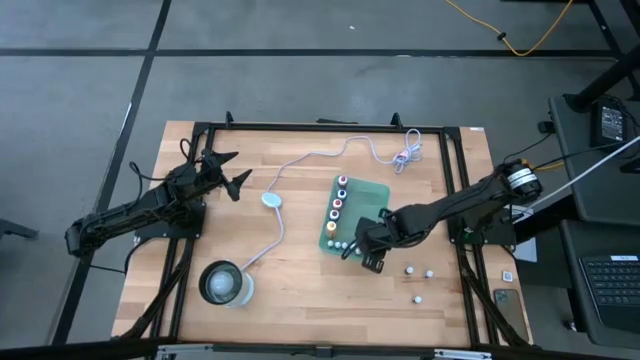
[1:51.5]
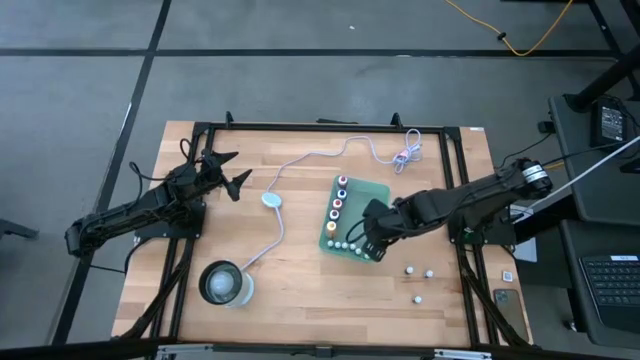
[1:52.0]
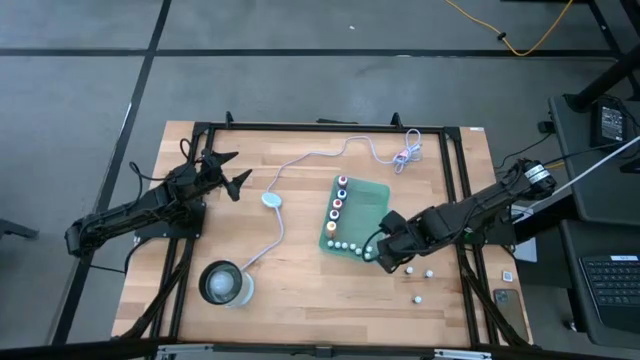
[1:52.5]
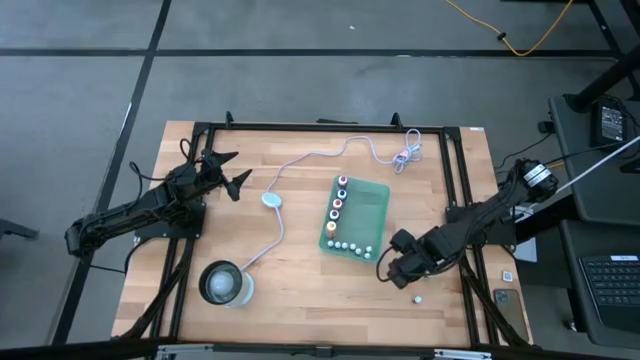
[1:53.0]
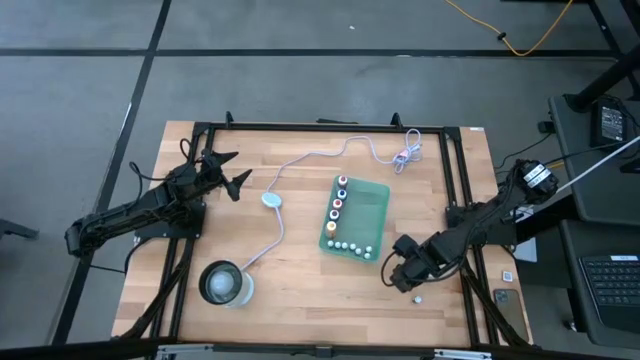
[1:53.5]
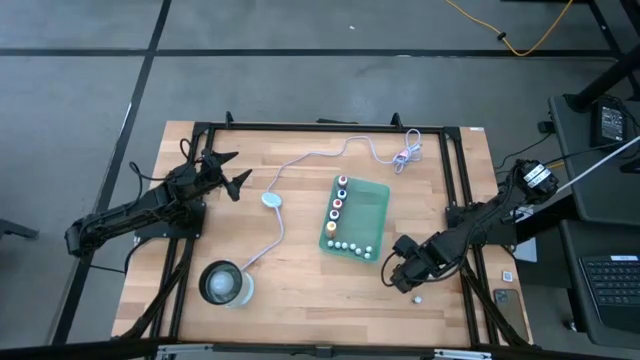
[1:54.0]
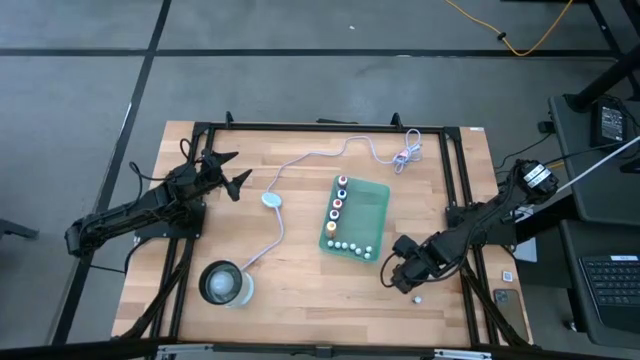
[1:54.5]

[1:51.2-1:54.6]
Task: Pick & Place food coloring
Put the small light green food coloring bottle into the green bin

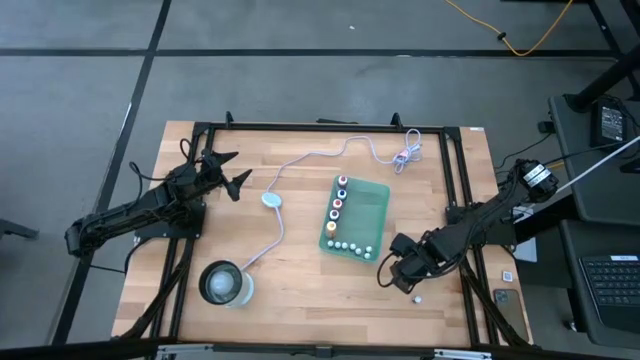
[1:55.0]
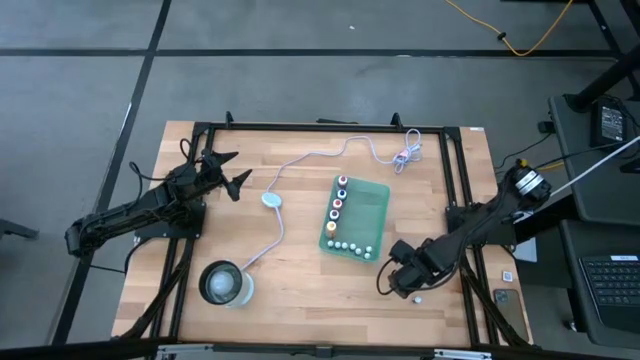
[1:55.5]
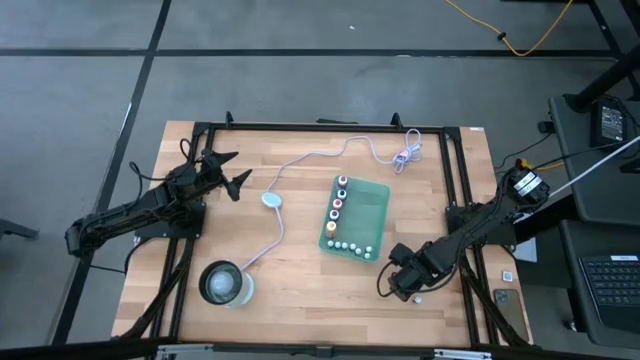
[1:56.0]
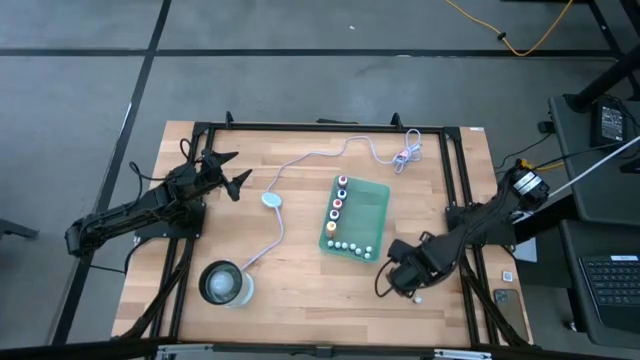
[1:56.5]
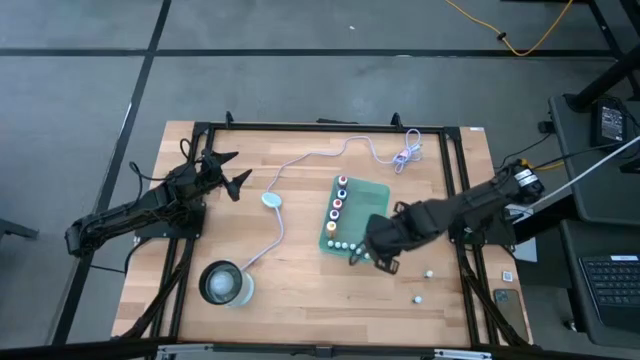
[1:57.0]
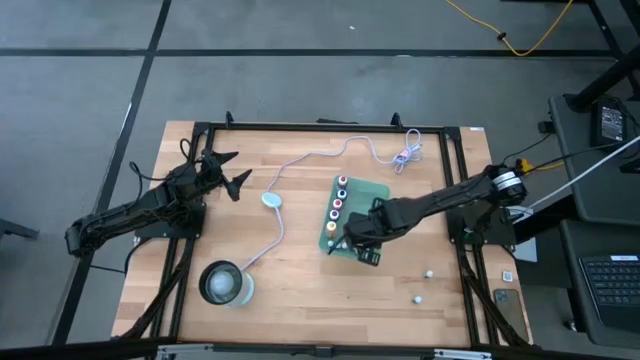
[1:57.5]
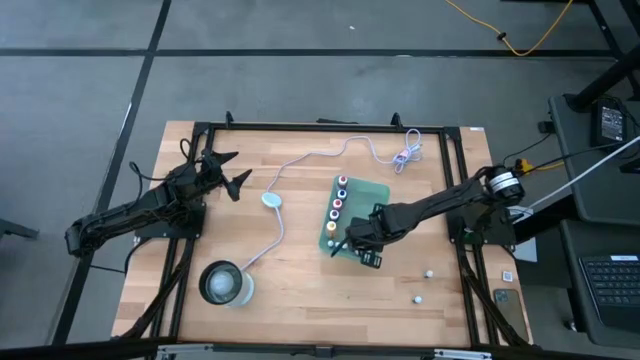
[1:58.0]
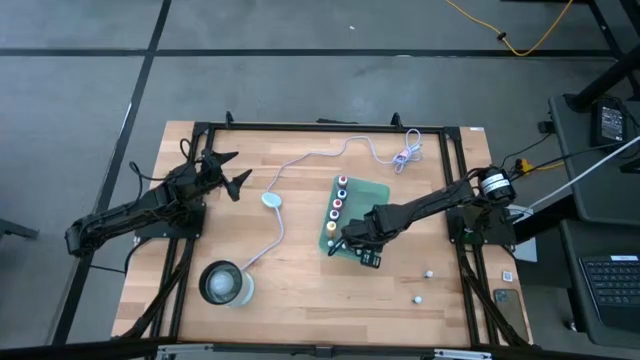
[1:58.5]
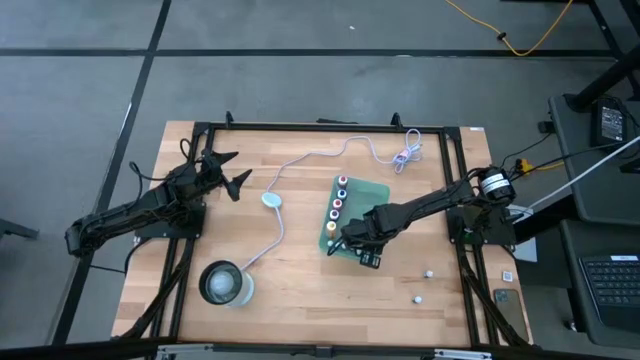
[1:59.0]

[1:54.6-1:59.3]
Put the small light green food coloring bottle into the green bin

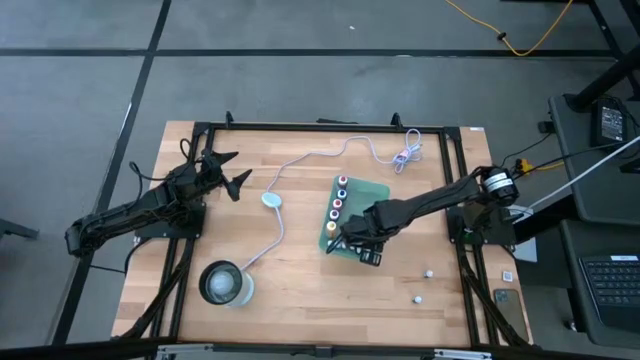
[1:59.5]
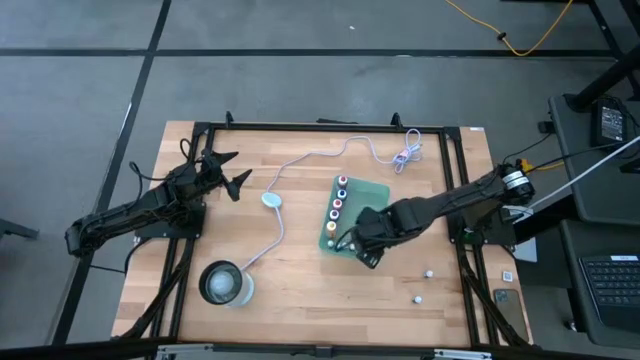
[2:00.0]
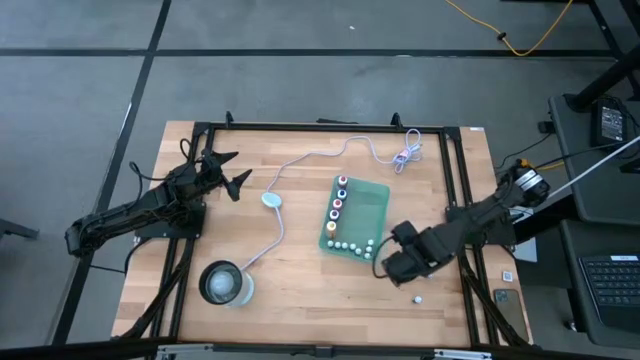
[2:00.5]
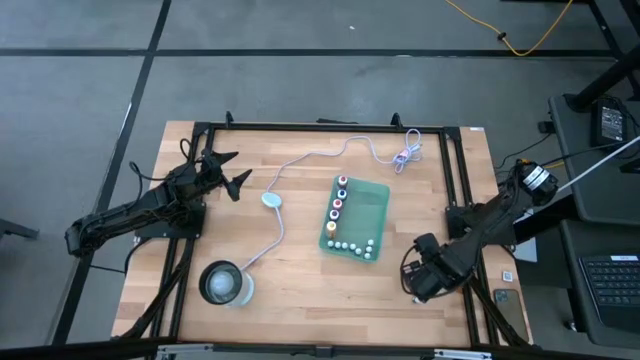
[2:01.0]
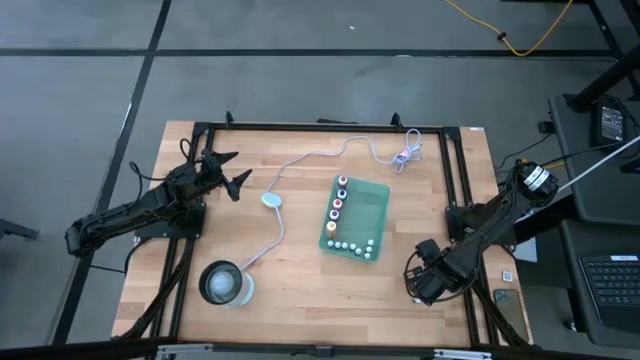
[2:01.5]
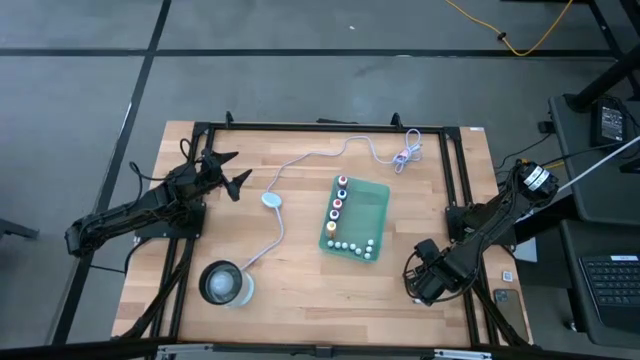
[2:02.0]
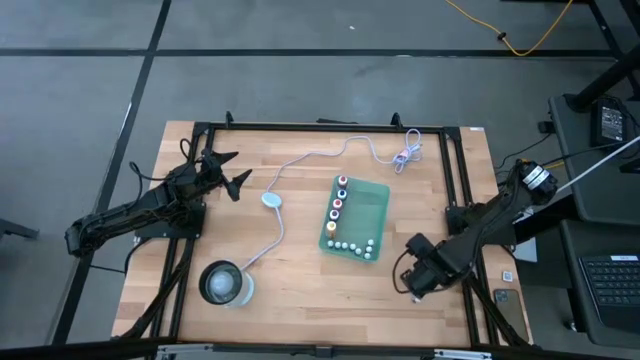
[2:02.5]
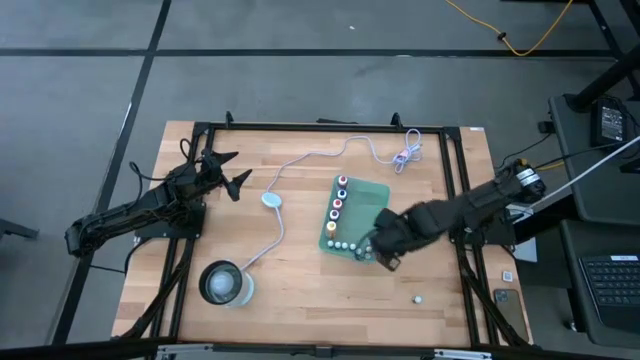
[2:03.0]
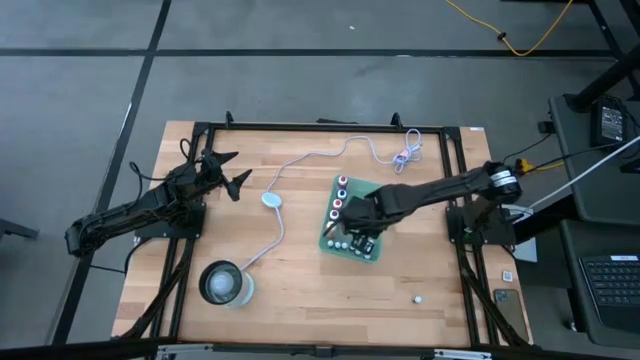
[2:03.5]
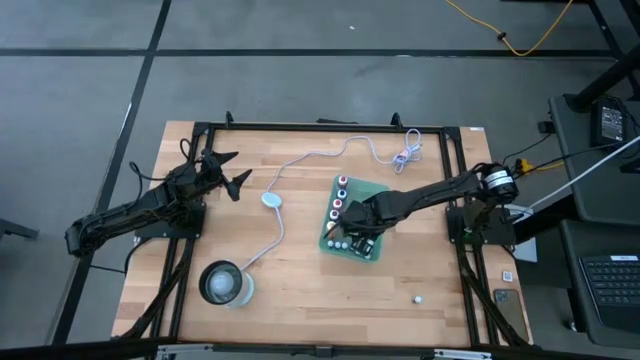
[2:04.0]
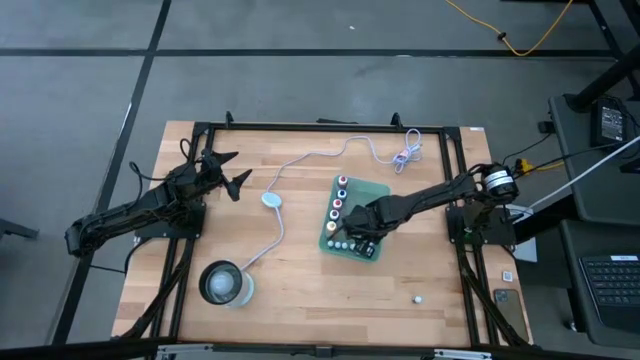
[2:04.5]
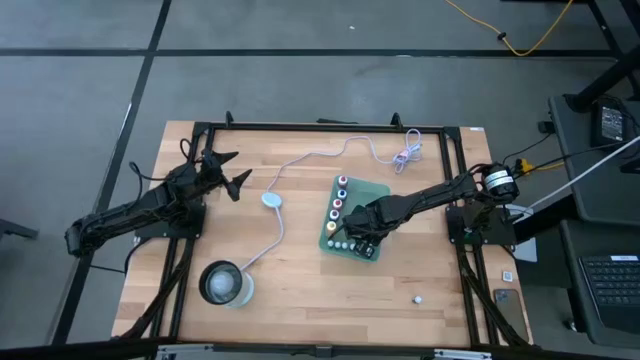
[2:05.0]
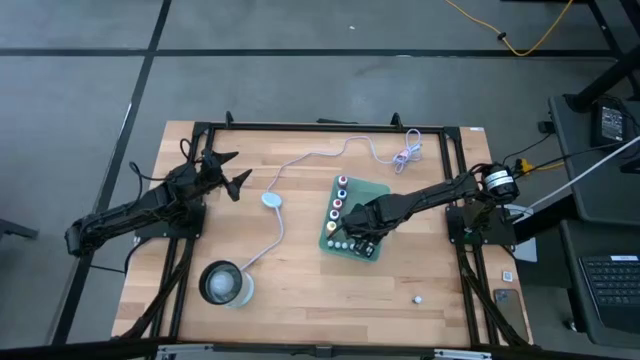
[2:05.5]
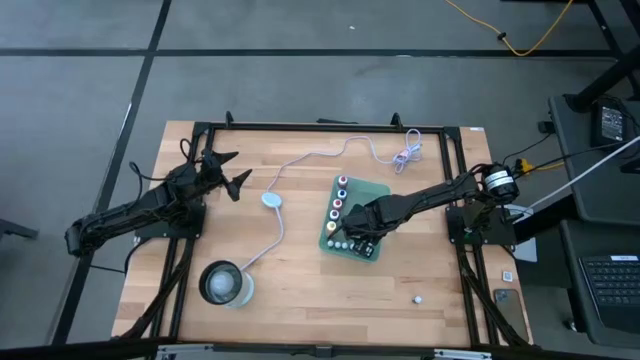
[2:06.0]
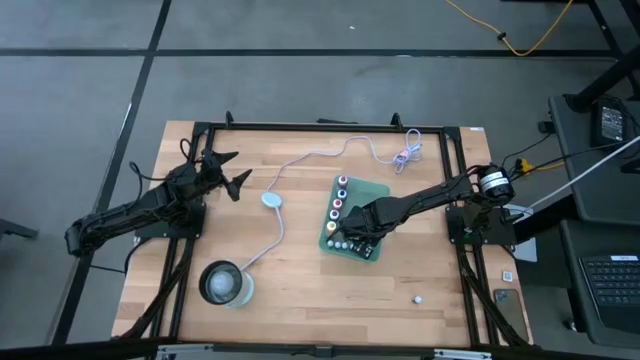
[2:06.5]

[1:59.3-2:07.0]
Put the small green food coloring bottle into the green bin

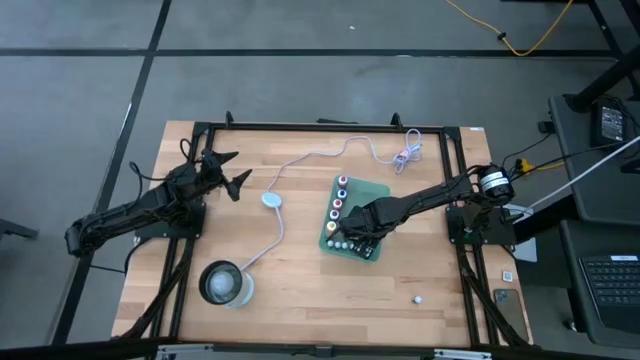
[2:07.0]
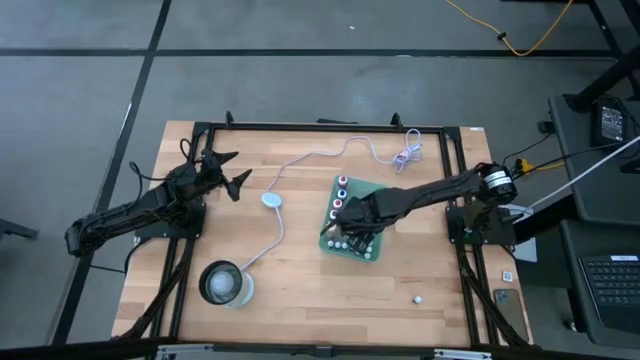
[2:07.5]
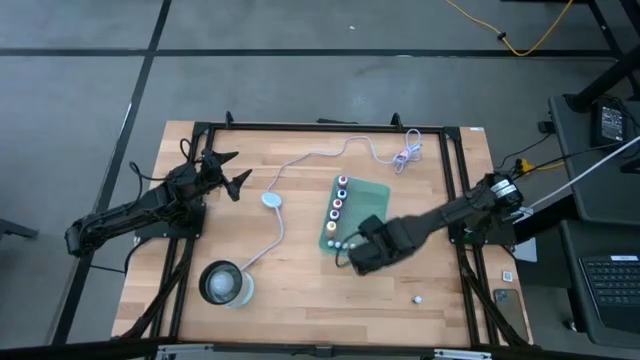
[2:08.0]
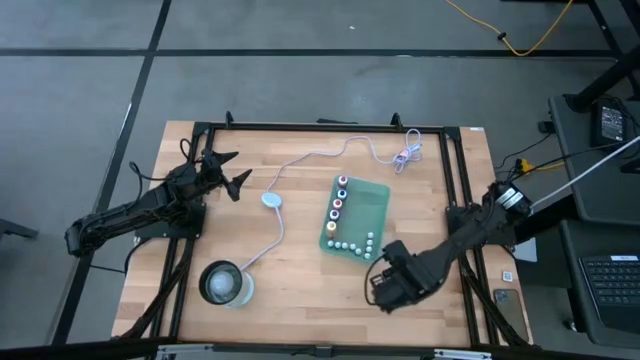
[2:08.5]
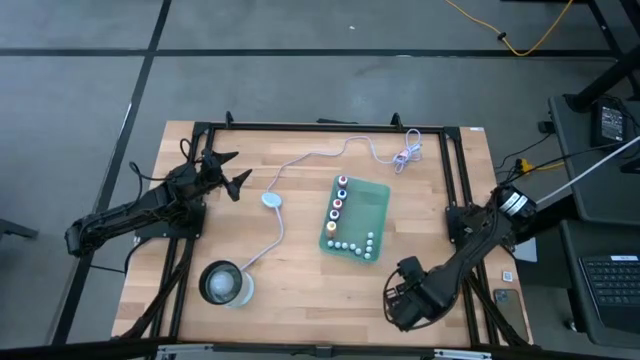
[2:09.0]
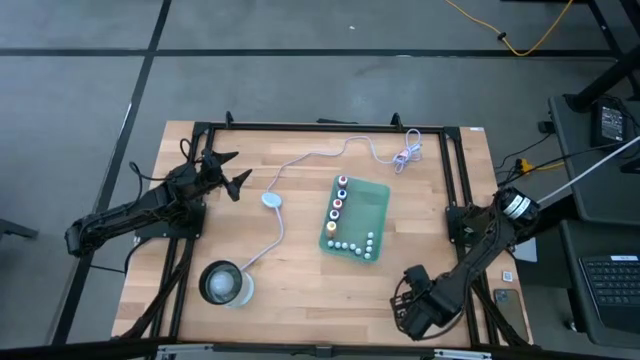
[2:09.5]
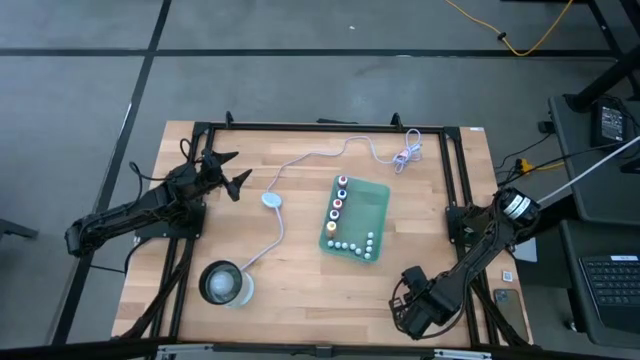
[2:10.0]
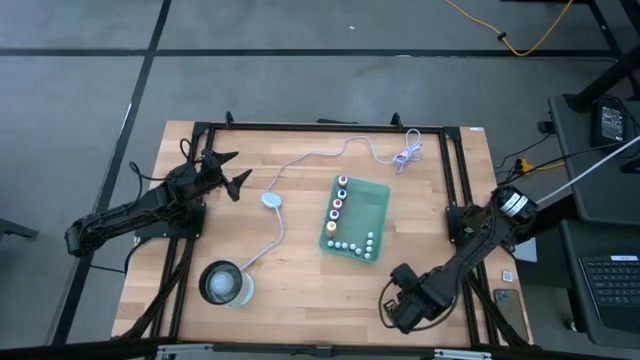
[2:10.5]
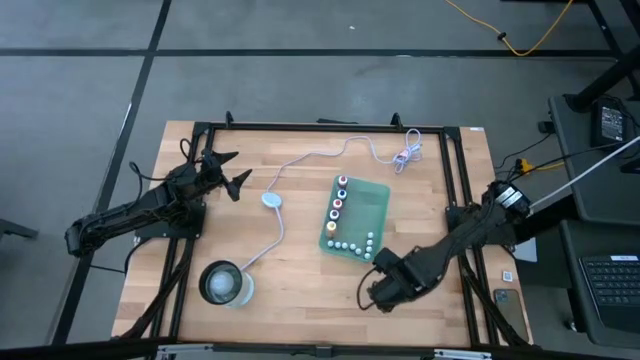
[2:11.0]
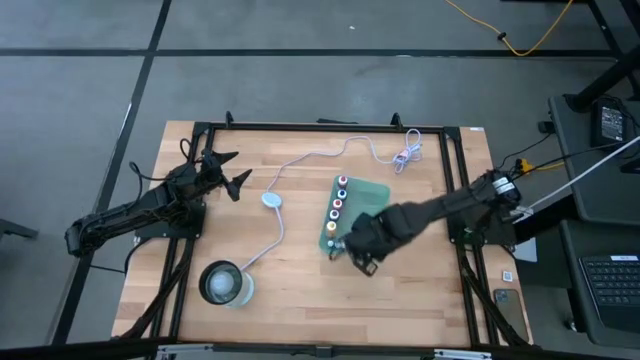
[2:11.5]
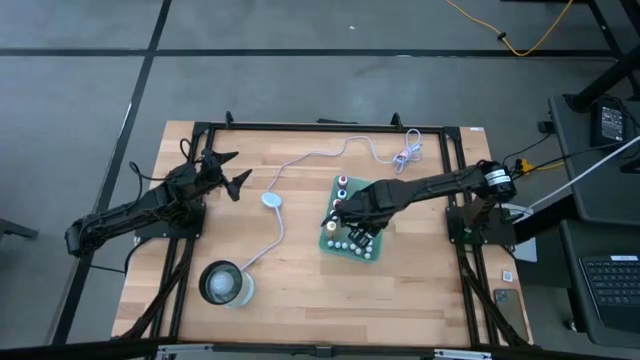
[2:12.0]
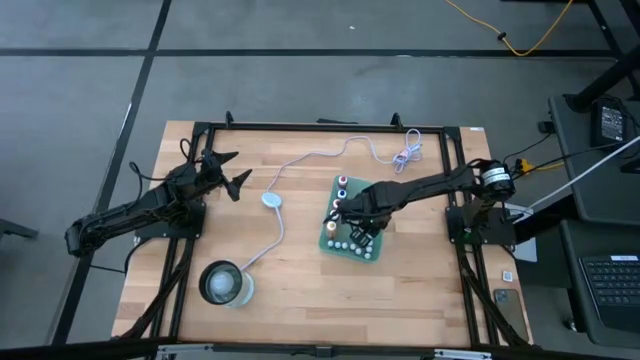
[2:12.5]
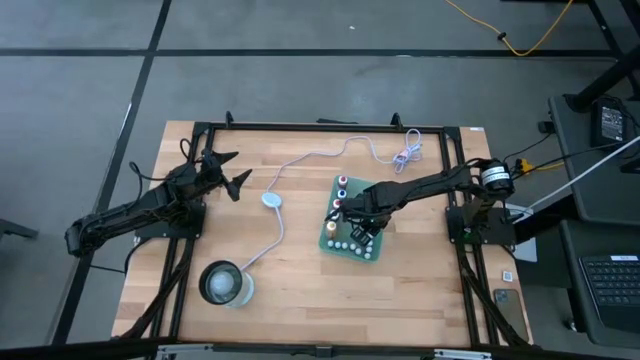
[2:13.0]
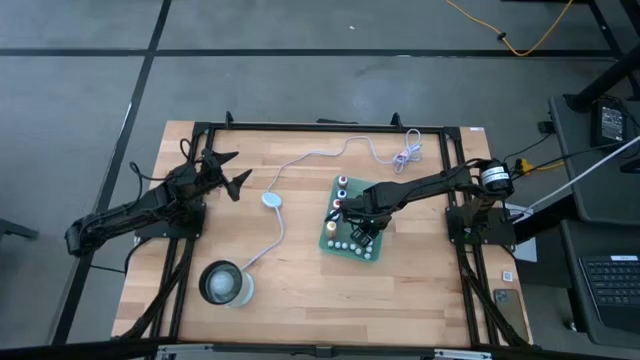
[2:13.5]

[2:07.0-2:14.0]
Put the small blue food coloring bottle into the green bin
